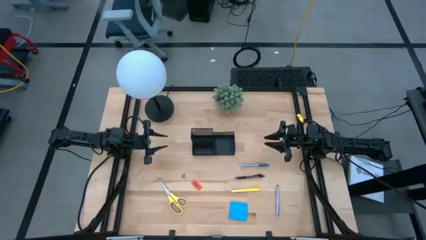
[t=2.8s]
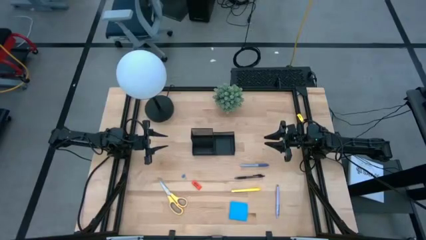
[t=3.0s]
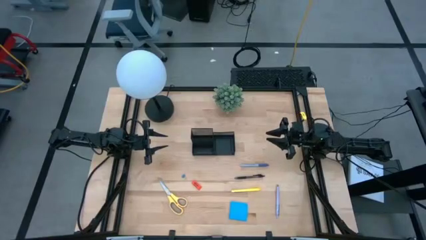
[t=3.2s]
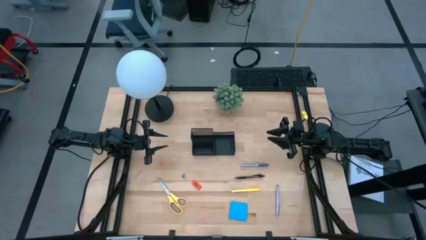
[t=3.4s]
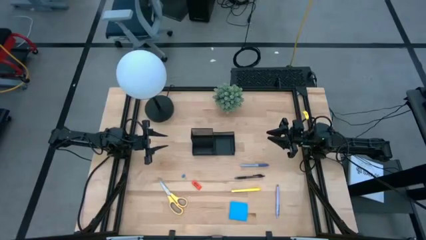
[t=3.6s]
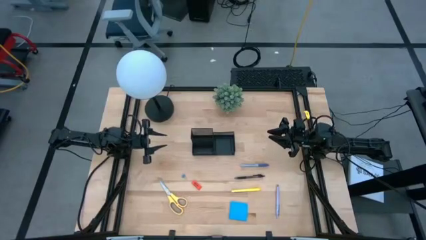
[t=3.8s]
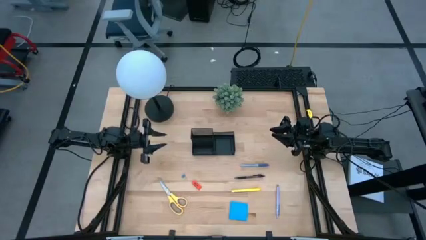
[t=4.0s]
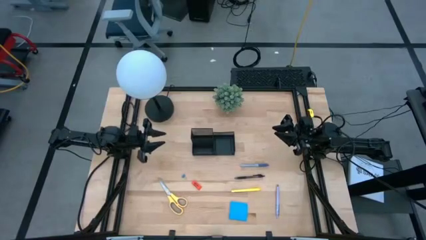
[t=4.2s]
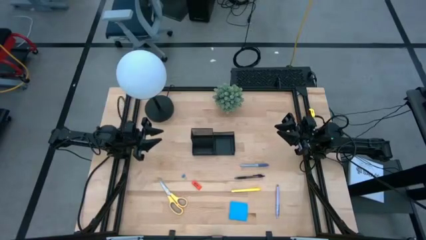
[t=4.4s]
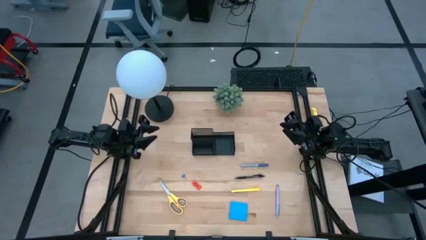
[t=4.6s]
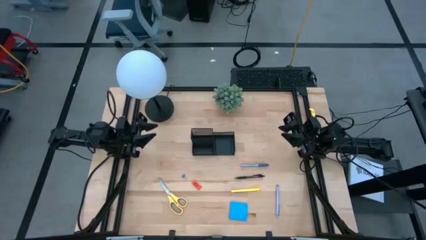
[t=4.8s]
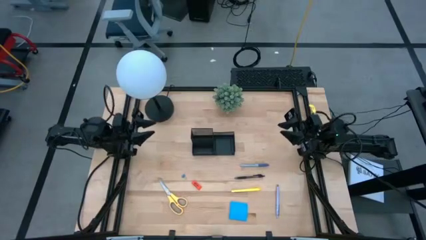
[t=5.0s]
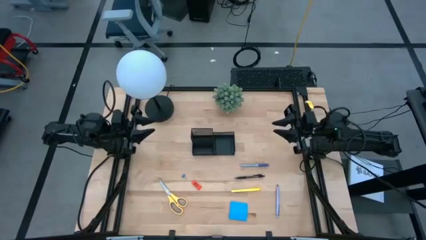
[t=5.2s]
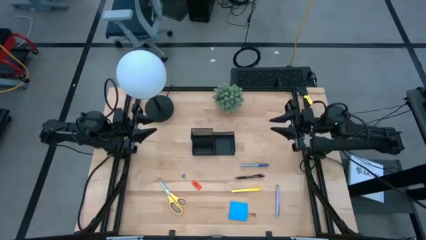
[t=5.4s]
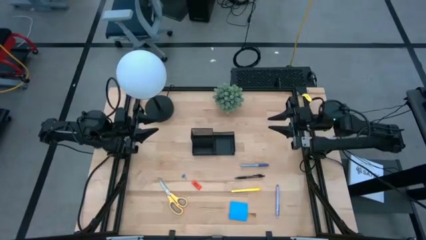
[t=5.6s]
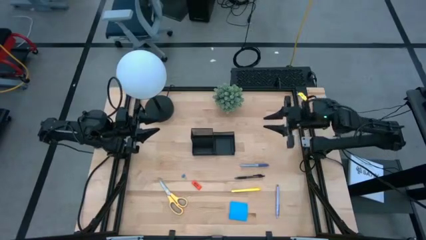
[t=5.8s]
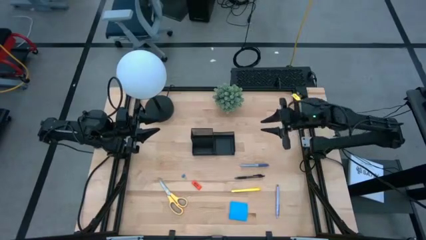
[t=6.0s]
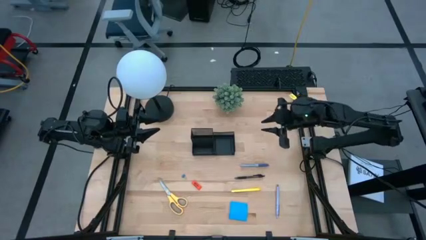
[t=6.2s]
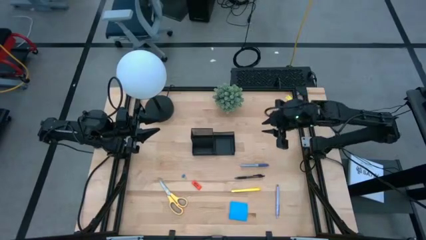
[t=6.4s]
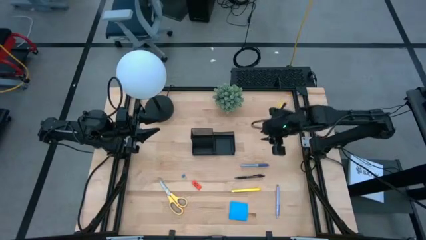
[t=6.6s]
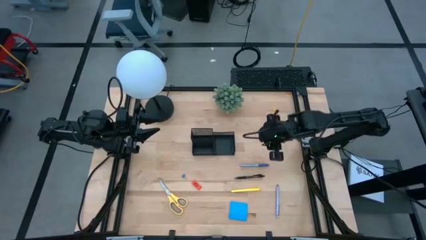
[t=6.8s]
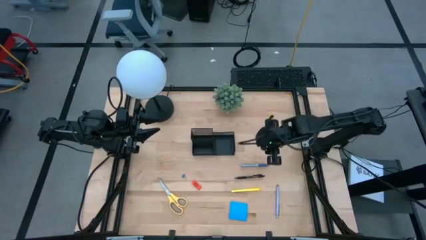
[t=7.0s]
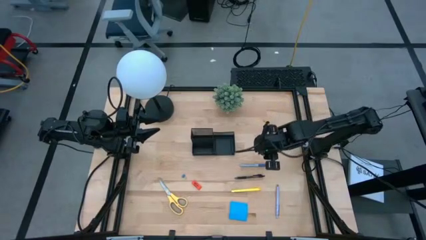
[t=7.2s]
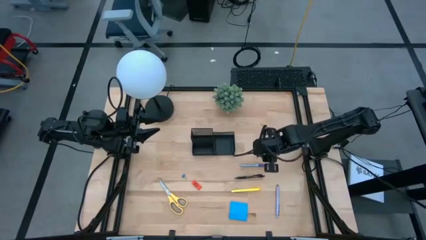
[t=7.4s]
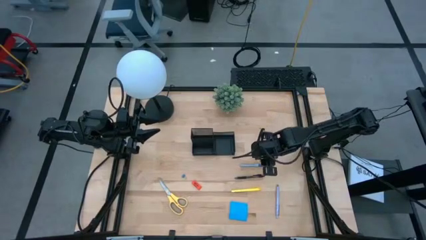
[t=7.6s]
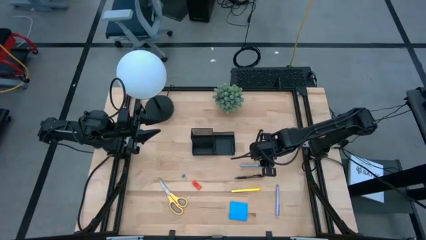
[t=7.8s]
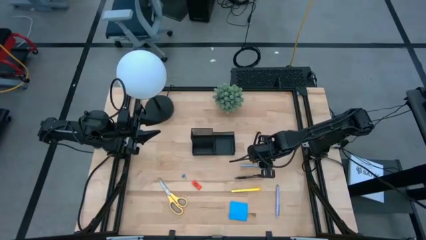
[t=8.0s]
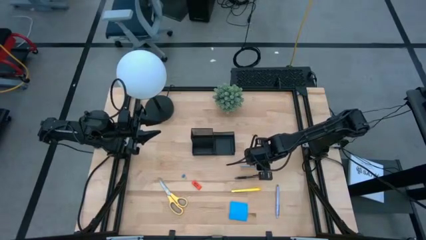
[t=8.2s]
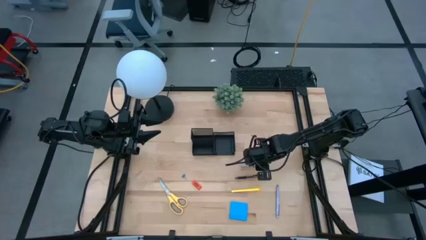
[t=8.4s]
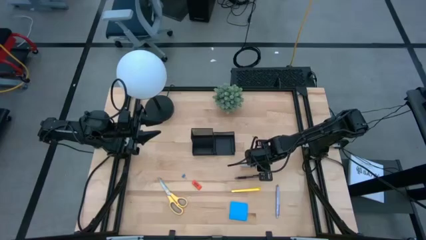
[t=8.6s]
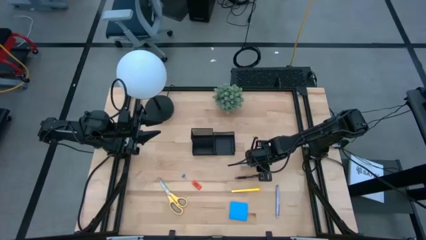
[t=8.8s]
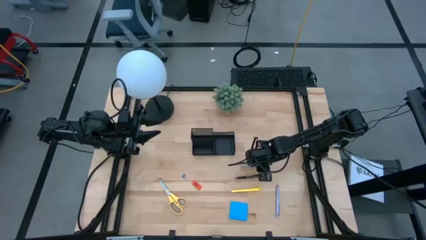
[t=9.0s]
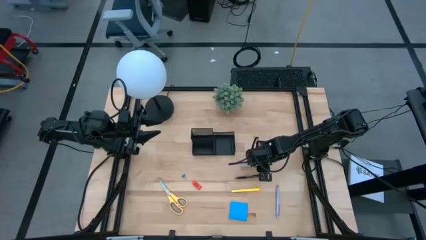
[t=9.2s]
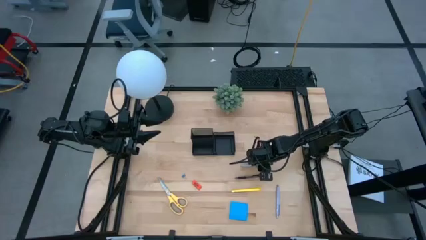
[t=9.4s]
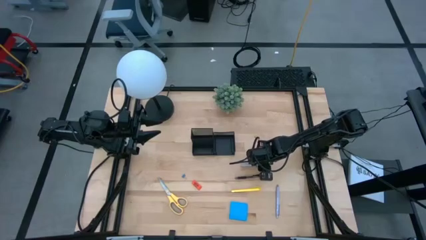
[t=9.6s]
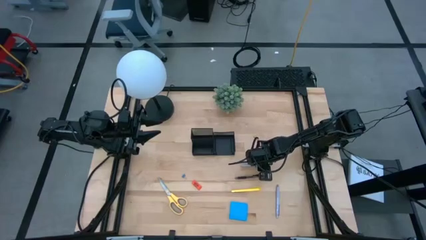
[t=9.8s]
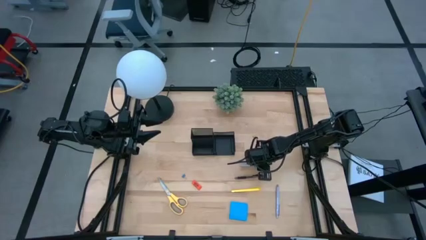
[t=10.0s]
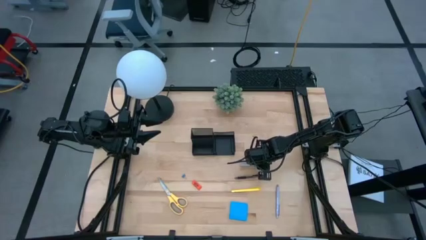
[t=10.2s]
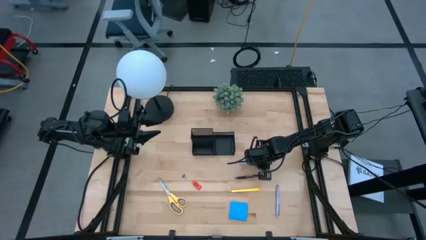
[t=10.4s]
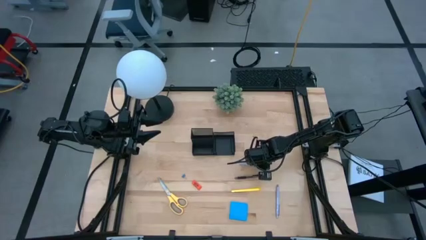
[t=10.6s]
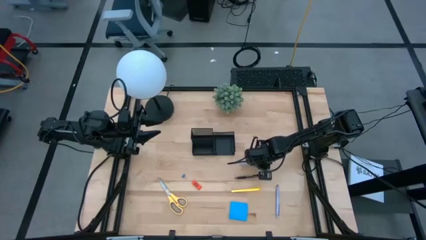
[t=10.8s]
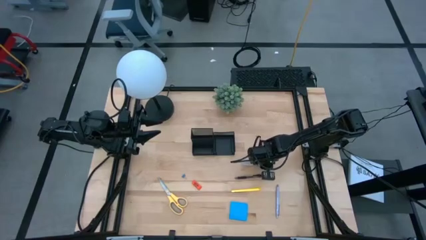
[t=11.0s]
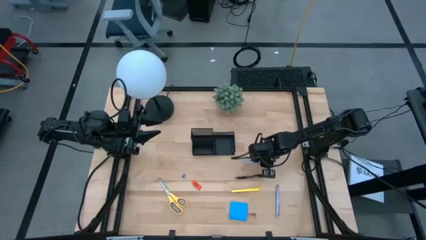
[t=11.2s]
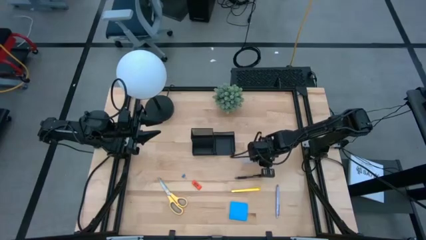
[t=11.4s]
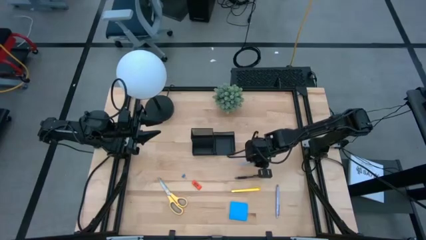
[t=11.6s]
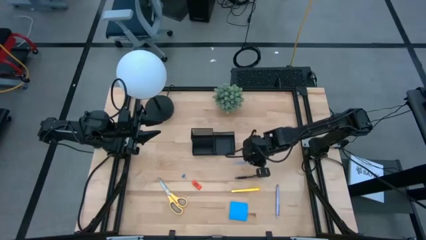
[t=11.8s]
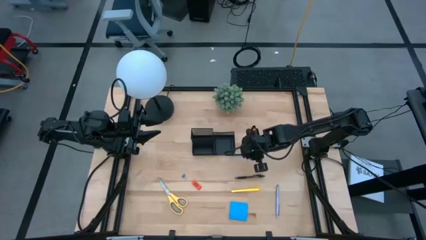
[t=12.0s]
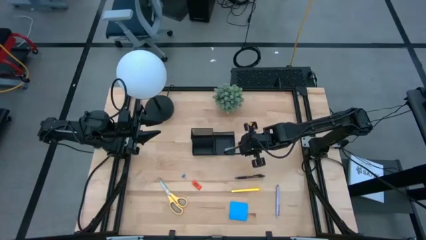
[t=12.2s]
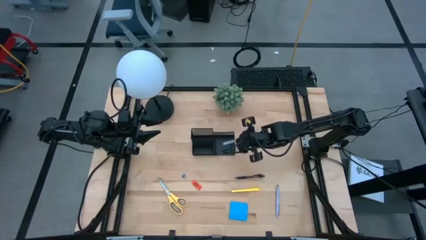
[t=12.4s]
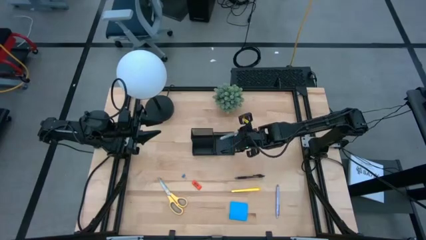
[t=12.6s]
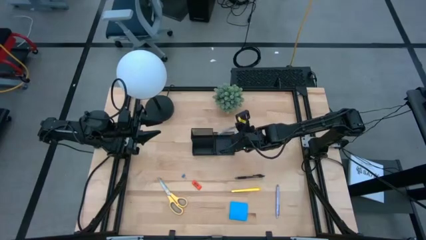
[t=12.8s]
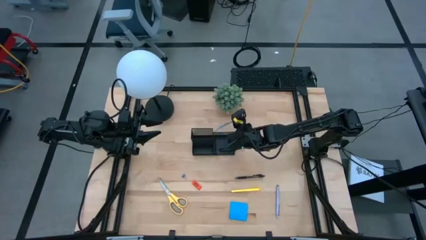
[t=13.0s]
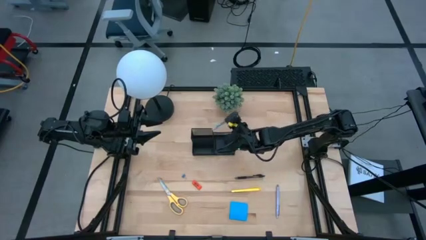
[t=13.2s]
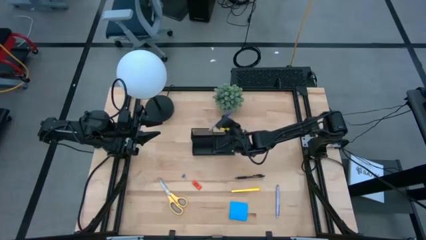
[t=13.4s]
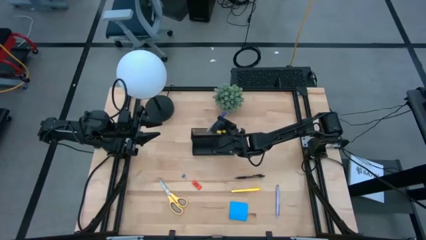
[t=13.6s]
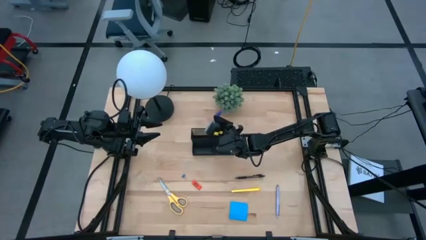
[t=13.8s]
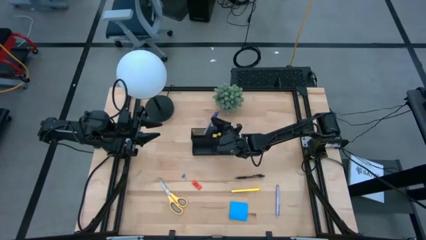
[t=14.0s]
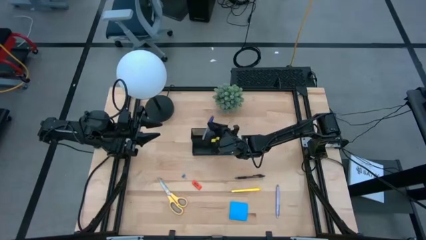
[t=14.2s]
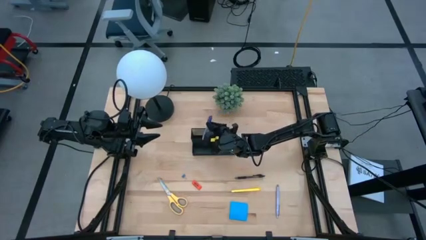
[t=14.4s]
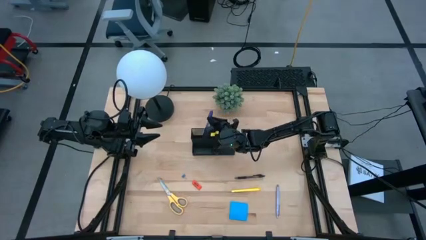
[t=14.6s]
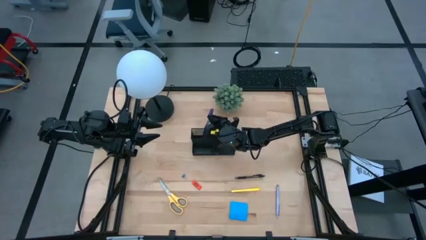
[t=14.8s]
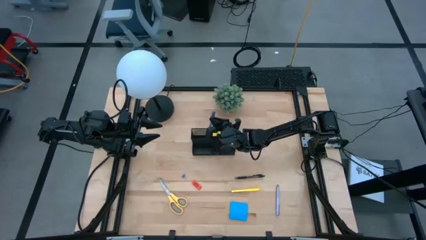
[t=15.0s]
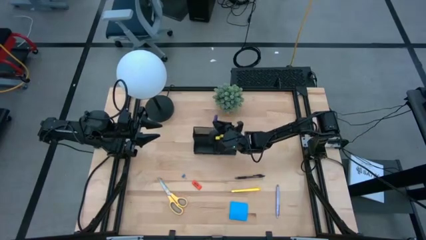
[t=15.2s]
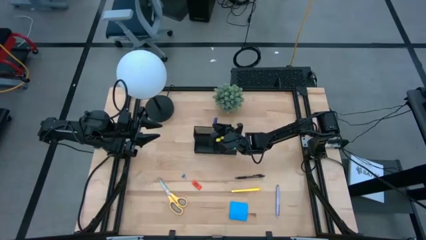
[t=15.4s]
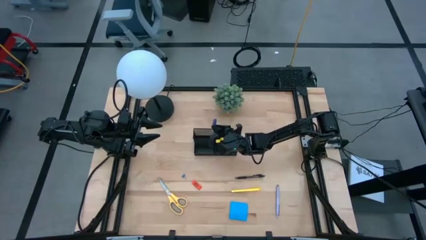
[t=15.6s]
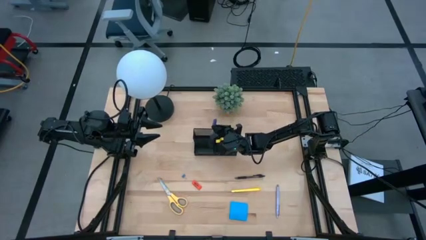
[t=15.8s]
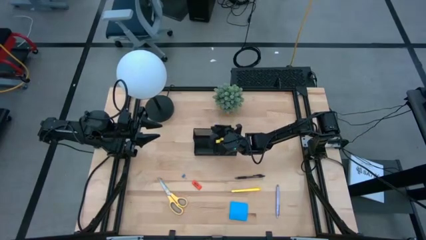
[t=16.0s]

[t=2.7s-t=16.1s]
Task: Pick and place office supplies into organizer
Put the marker pen into the desk organizer
